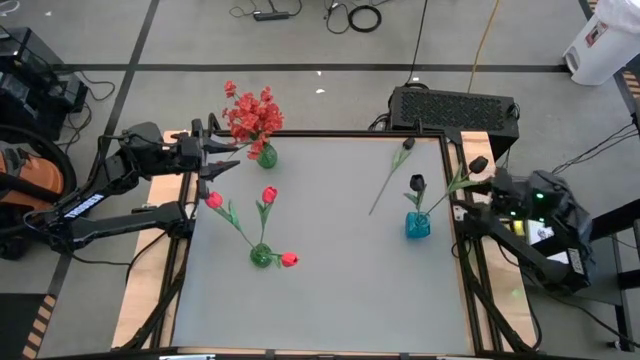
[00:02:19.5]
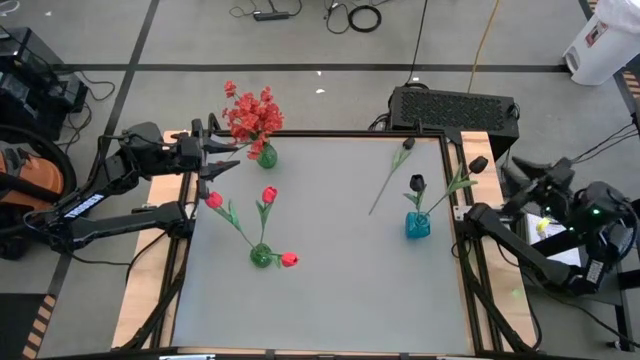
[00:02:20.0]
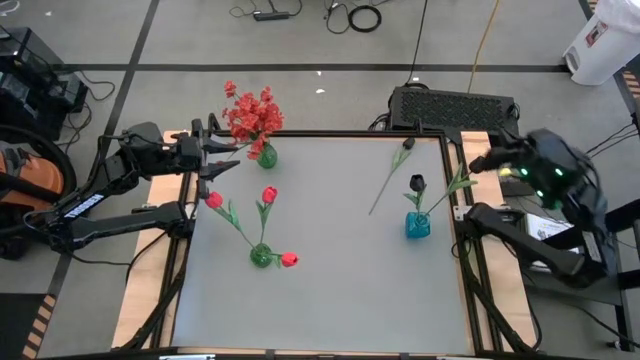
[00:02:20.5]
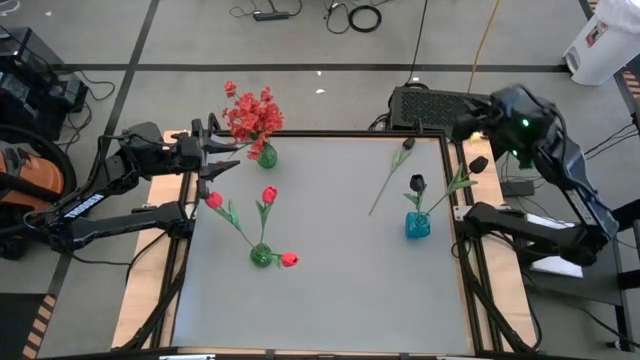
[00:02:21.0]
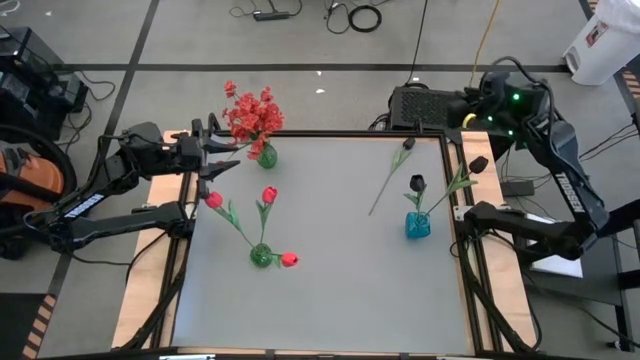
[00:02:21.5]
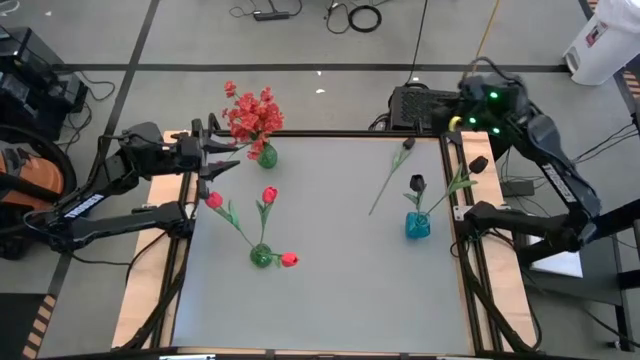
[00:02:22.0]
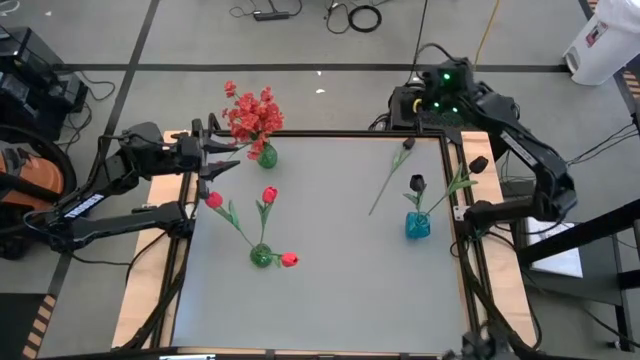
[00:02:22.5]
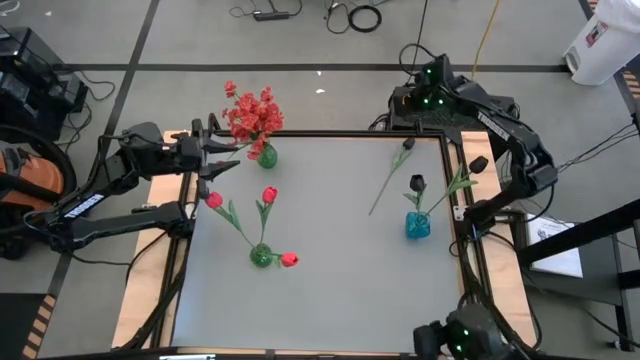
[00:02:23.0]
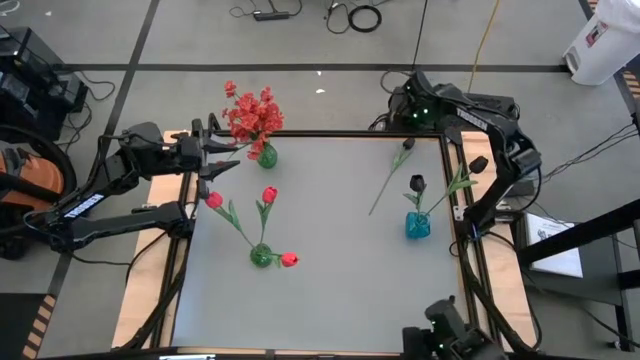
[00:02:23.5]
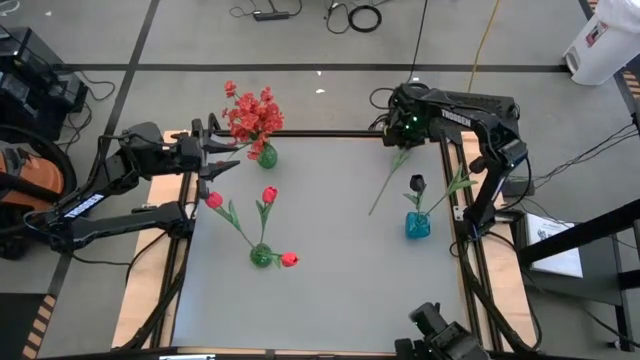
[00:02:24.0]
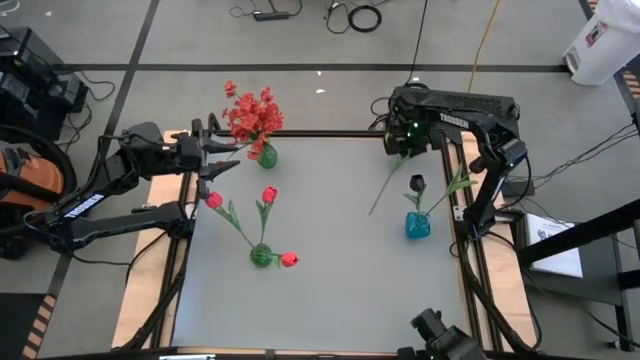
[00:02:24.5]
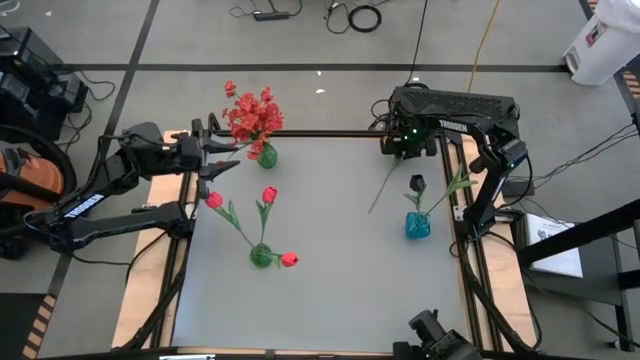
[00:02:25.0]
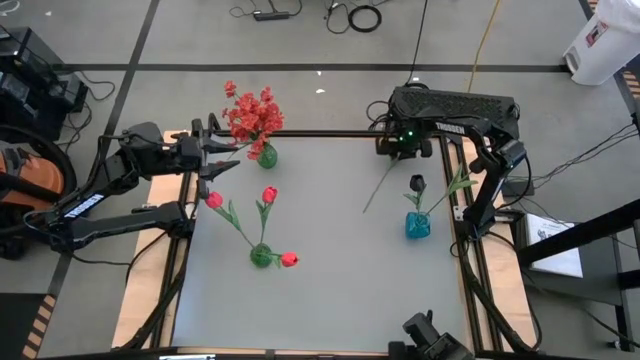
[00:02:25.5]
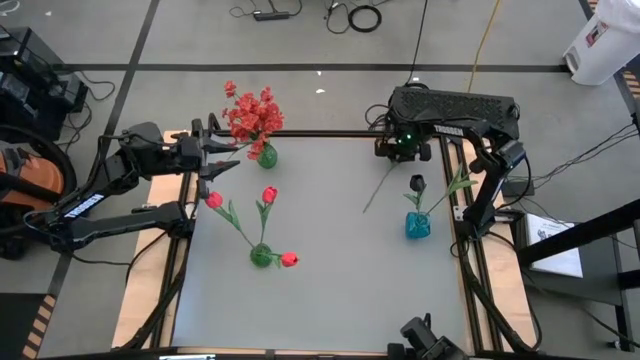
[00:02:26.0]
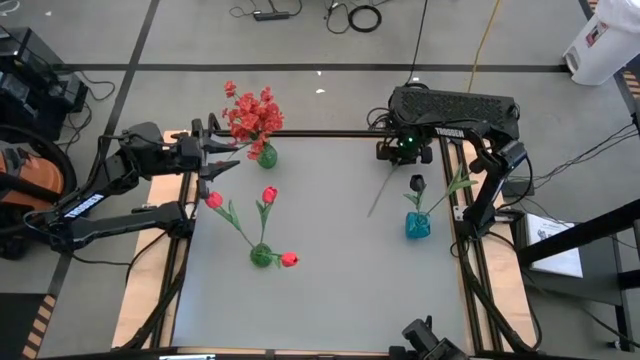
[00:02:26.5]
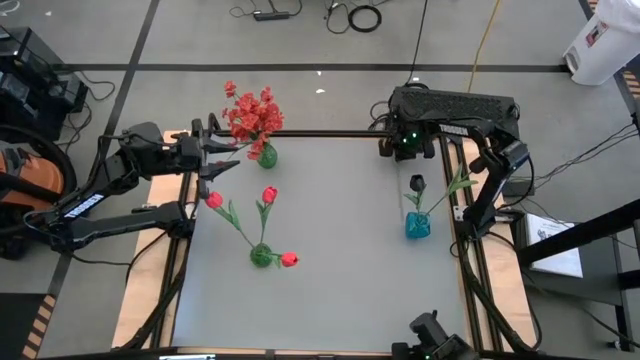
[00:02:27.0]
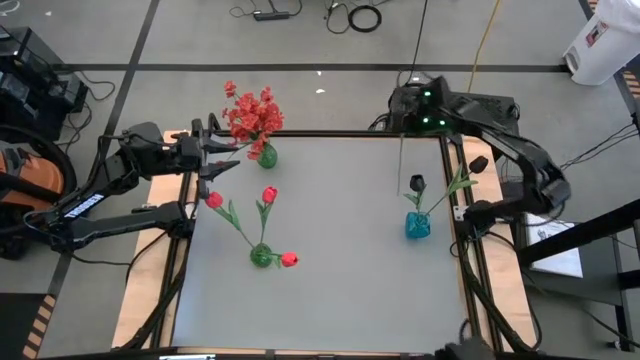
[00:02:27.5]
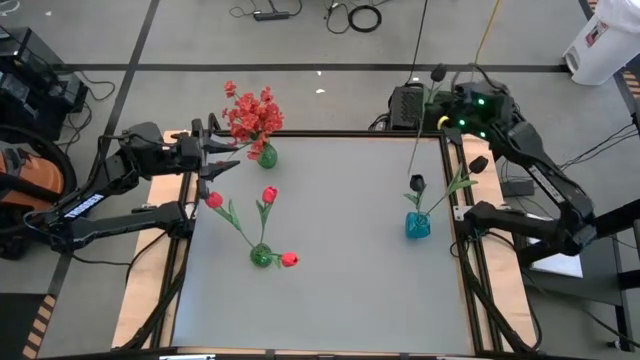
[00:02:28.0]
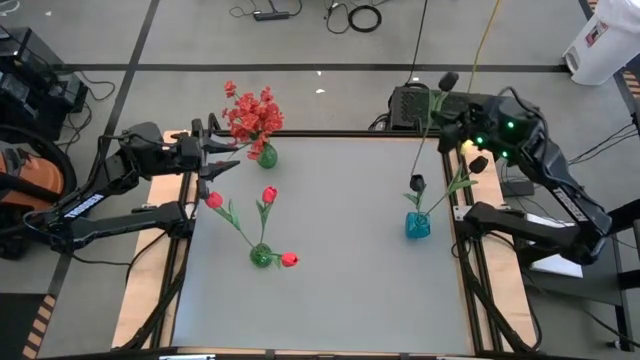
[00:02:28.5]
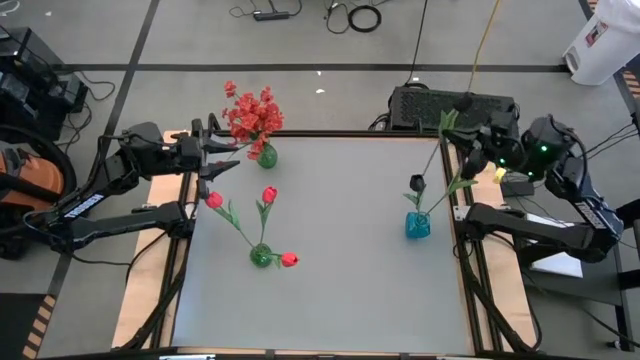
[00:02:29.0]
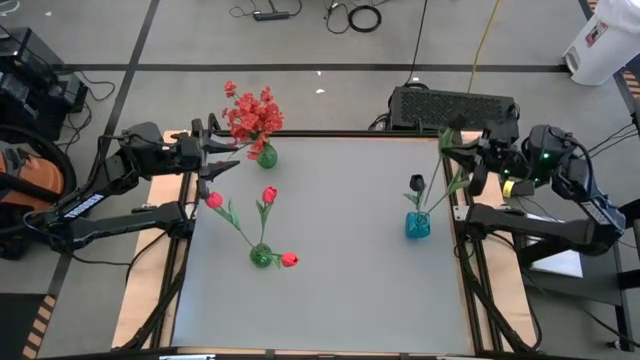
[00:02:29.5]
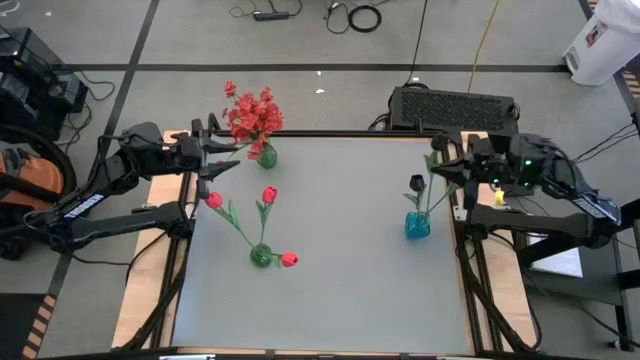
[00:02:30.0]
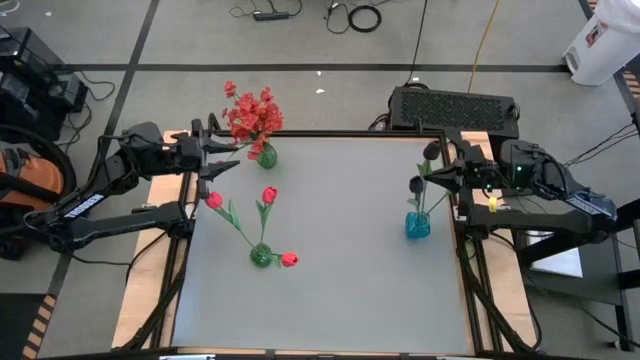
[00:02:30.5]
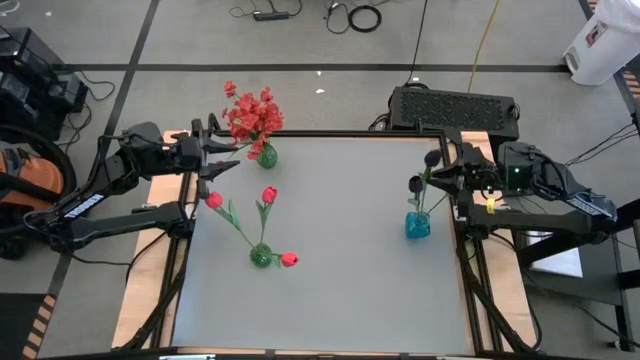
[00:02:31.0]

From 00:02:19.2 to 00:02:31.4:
Task: Sort flowers into vase by color
Put the black flower into the blue vase

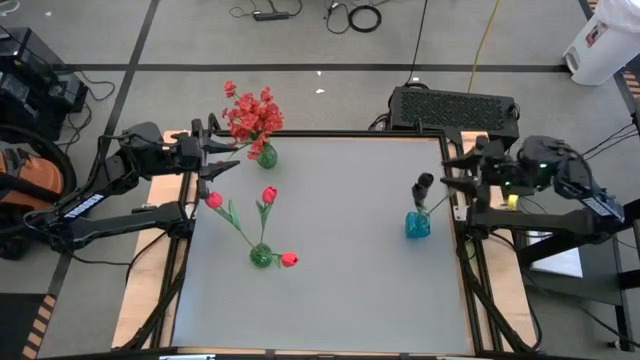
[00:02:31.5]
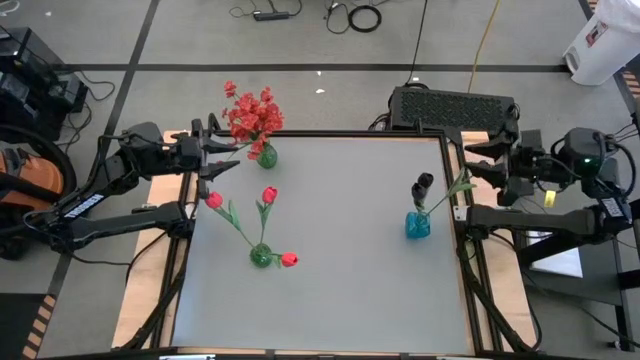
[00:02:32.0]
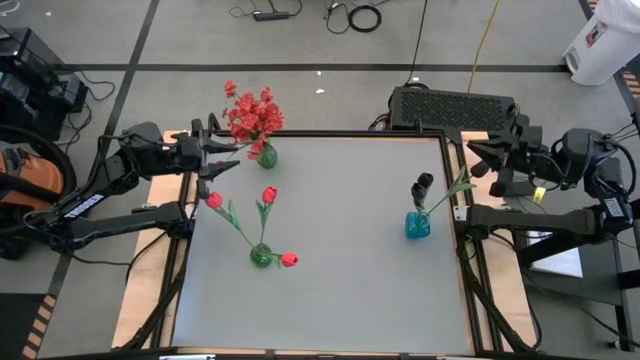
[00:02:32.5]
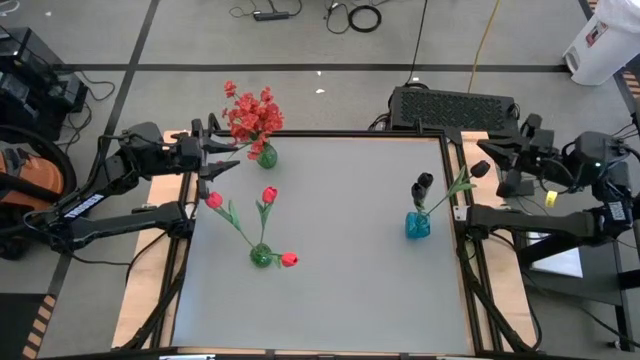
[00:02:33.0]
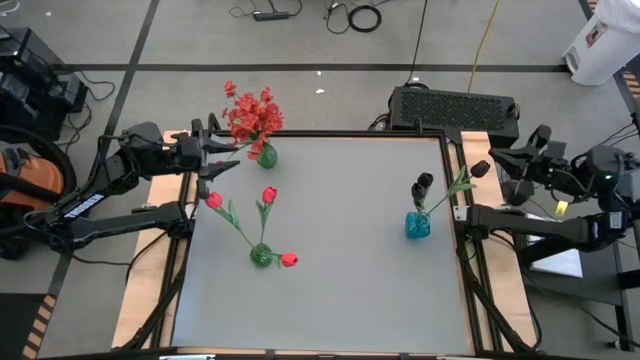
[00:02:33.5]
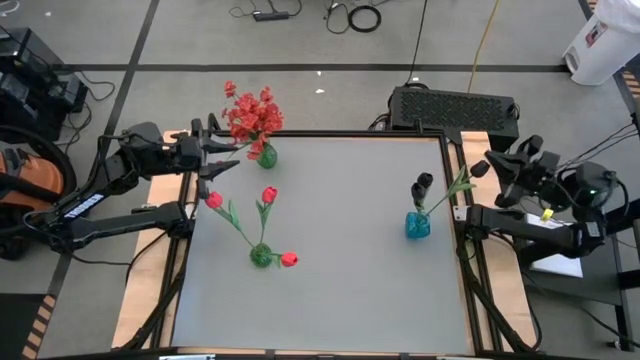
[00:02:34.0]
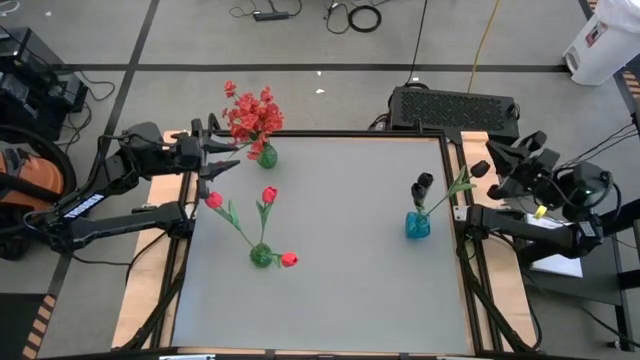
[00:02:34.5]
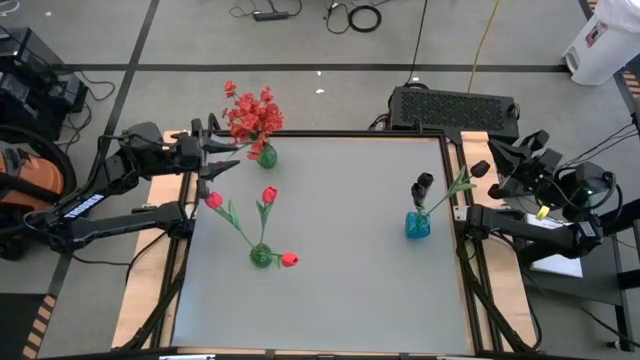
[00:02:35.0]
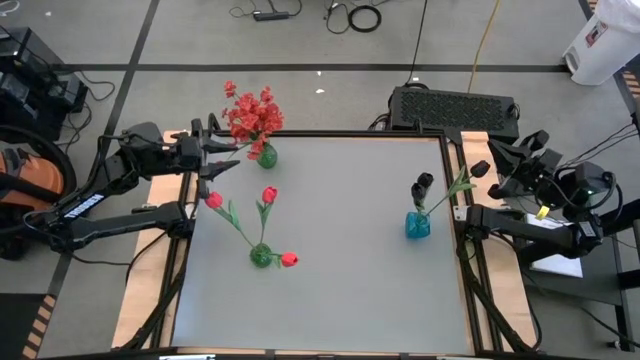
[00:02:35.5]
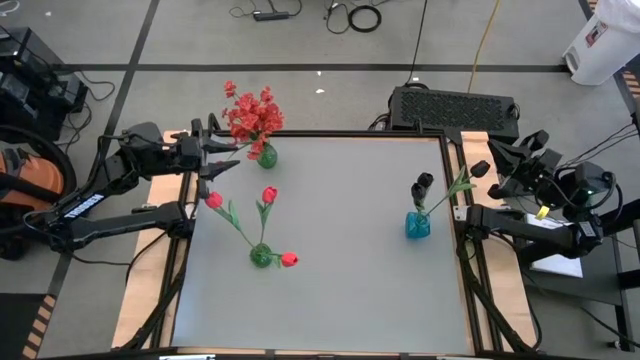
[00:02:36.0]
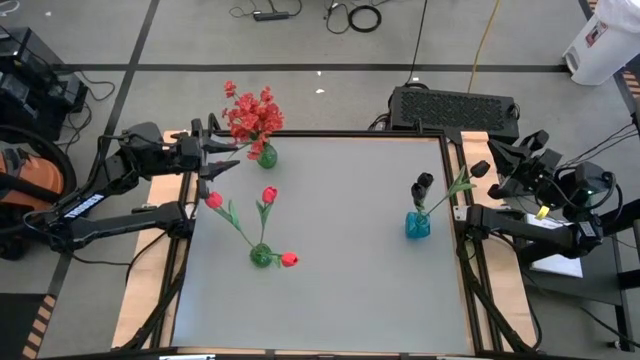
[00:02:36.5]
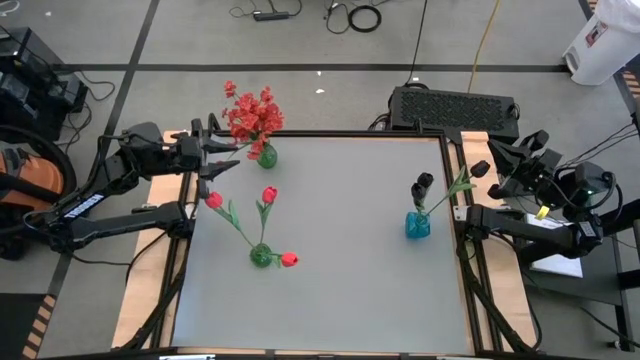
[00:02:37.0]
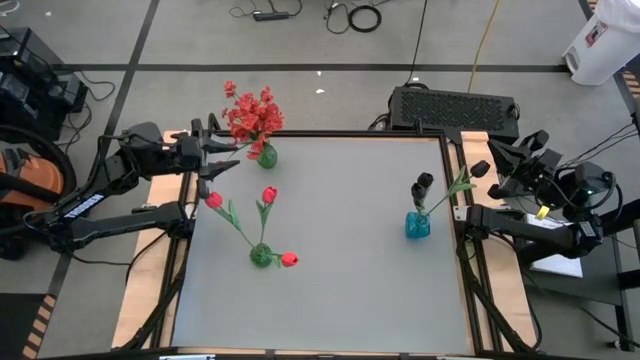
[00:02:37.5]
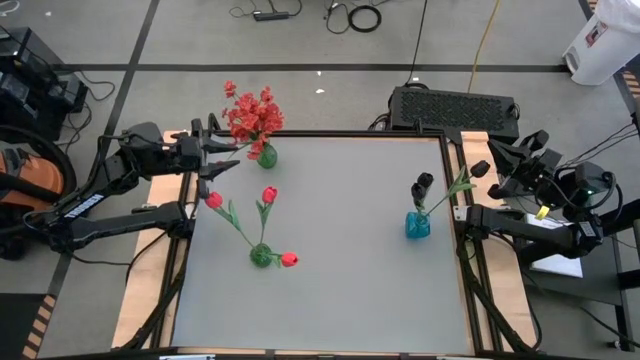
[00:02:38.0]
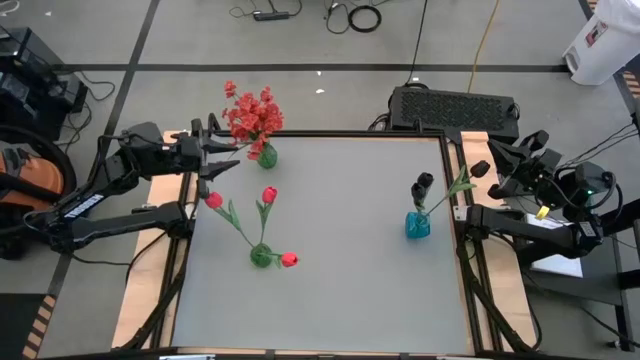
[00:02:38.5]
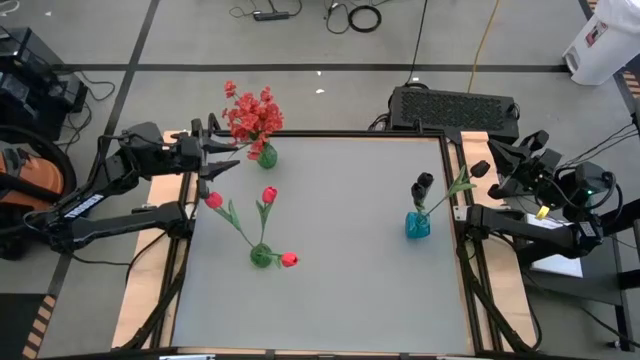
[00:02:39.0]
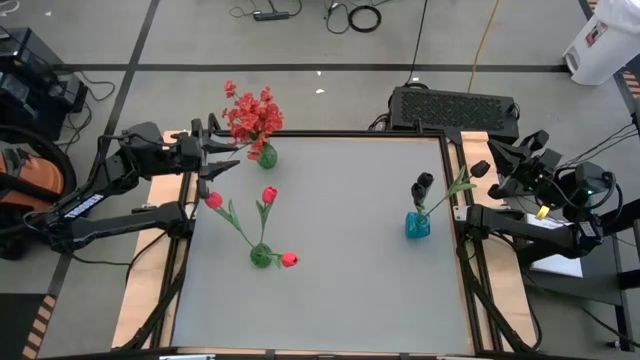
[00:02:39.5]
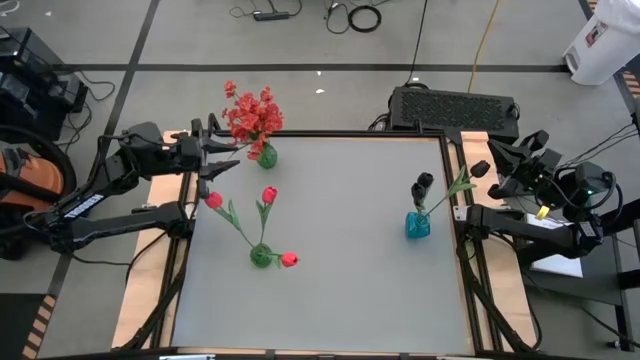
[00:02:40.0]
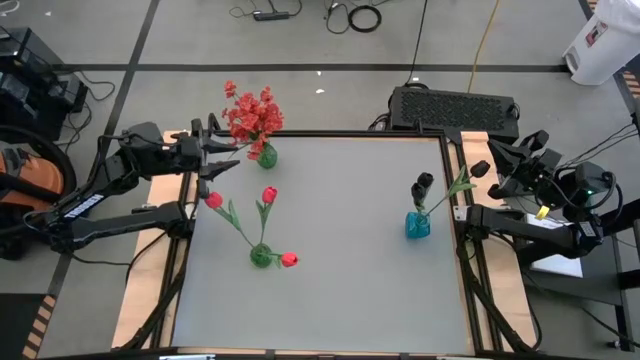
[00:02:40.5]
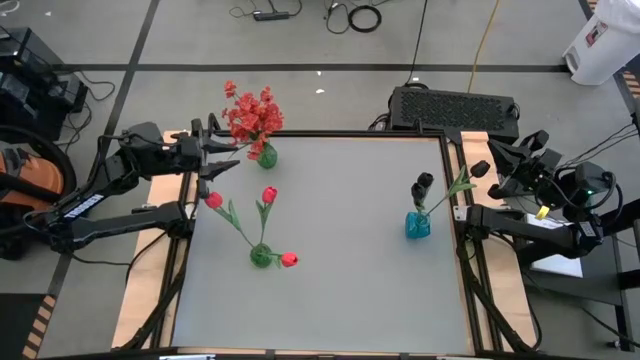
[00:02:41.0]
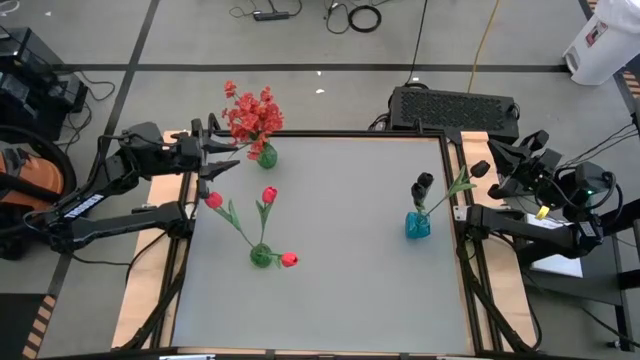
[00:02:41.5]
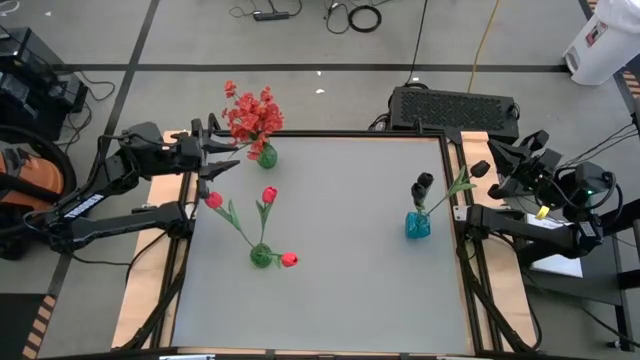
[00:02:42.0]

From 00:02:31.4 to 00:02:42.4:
Return to Home Position
